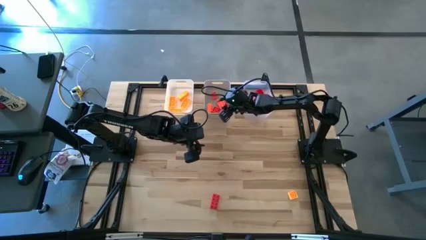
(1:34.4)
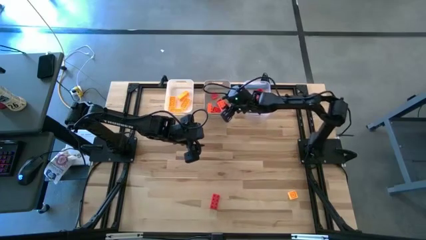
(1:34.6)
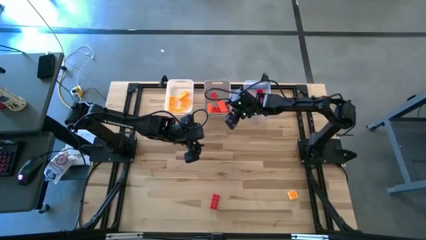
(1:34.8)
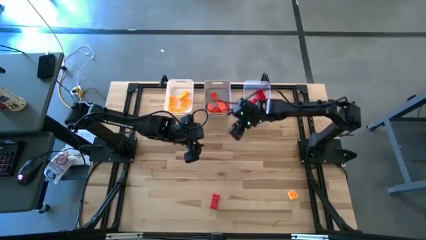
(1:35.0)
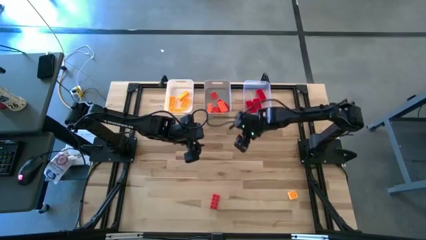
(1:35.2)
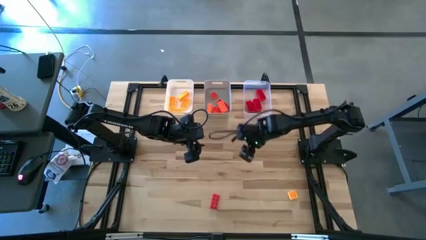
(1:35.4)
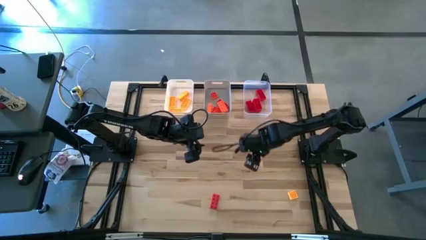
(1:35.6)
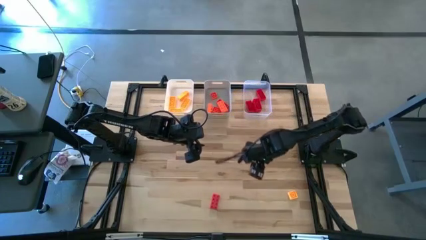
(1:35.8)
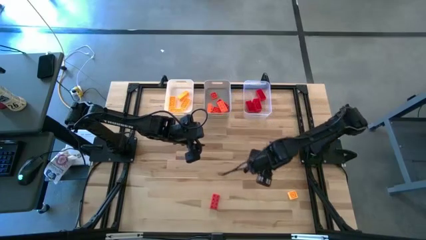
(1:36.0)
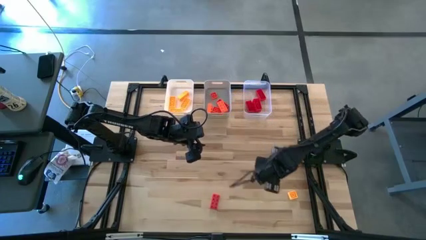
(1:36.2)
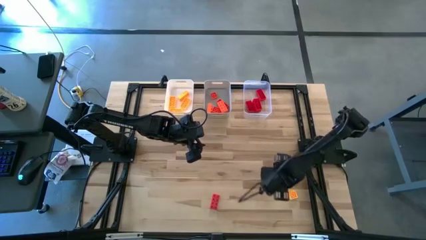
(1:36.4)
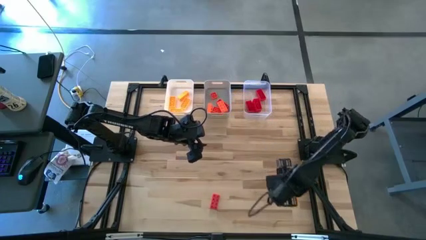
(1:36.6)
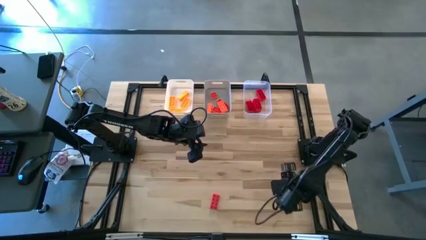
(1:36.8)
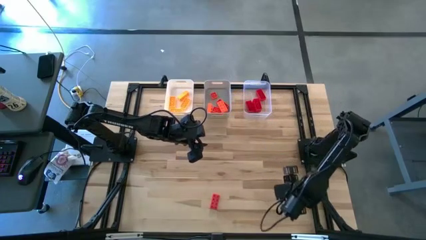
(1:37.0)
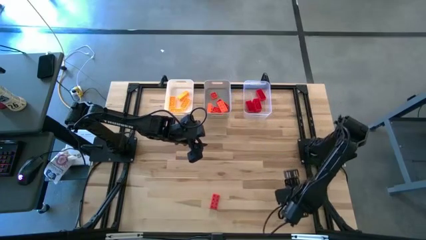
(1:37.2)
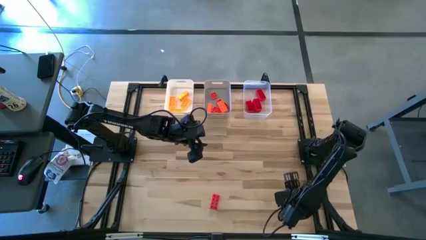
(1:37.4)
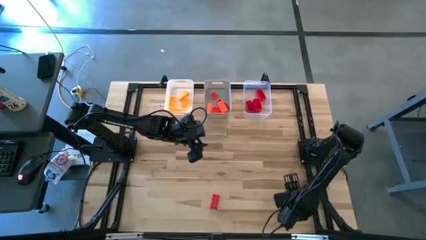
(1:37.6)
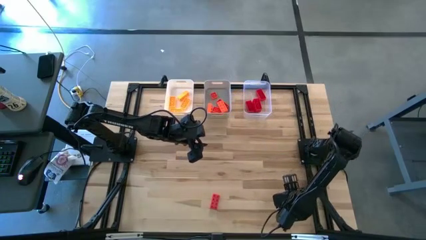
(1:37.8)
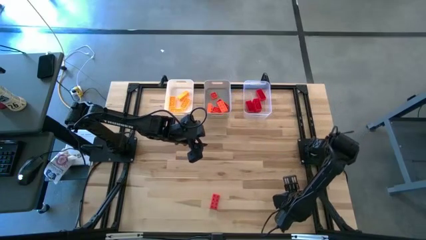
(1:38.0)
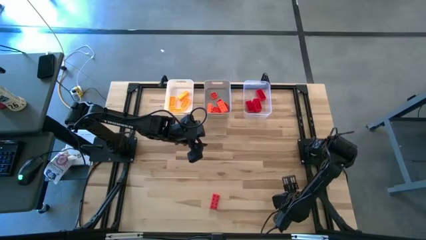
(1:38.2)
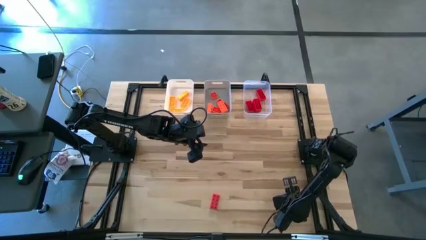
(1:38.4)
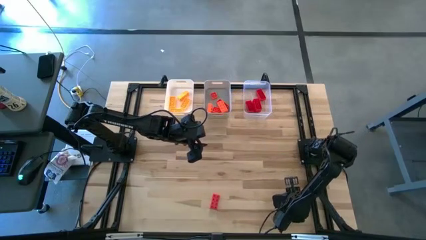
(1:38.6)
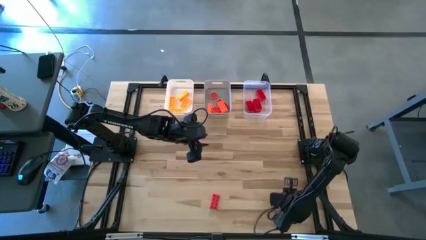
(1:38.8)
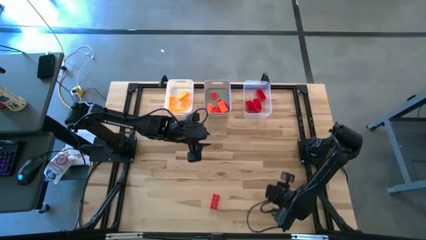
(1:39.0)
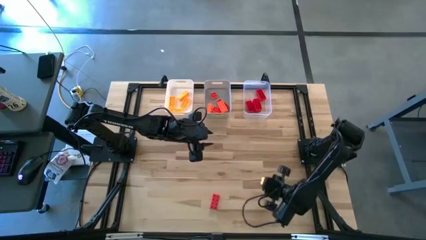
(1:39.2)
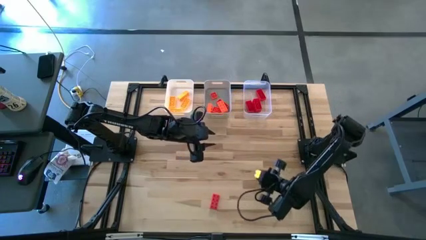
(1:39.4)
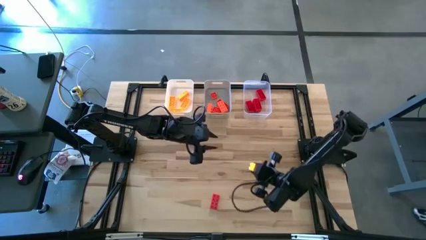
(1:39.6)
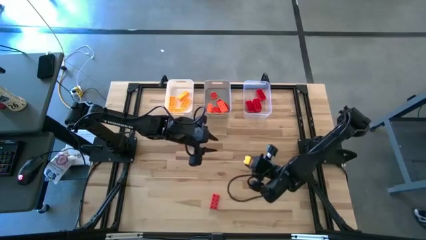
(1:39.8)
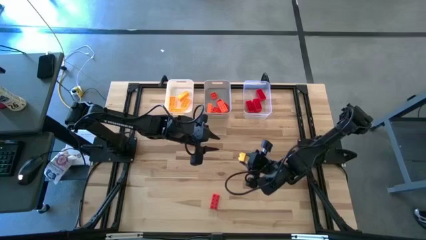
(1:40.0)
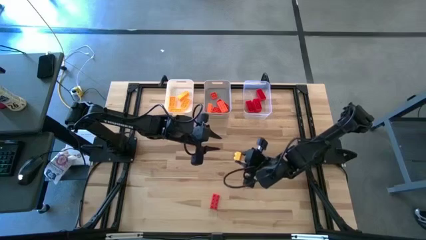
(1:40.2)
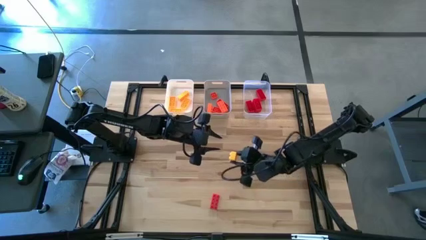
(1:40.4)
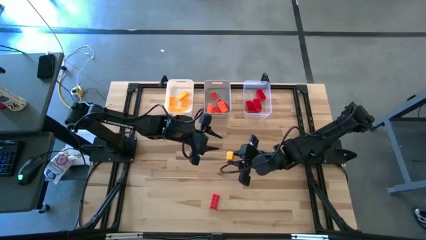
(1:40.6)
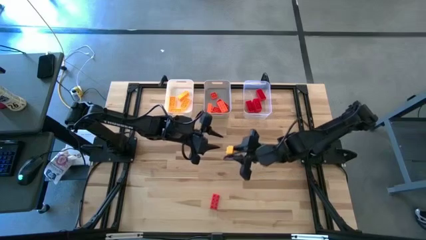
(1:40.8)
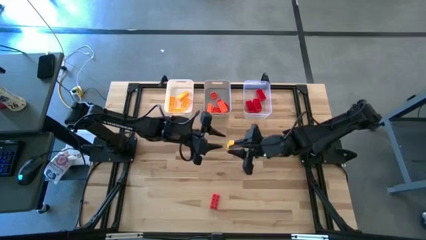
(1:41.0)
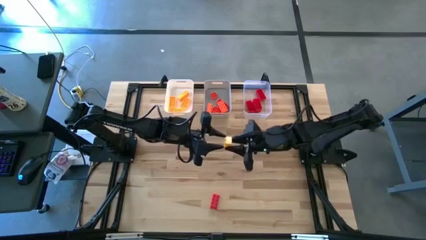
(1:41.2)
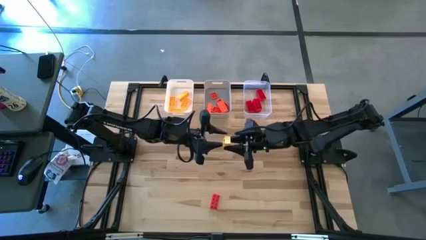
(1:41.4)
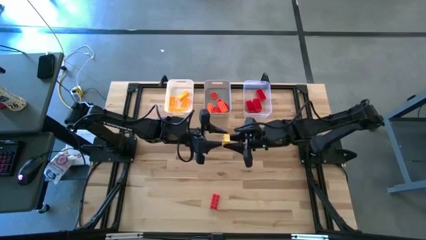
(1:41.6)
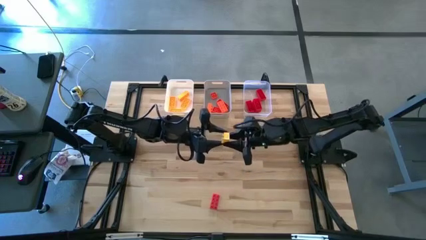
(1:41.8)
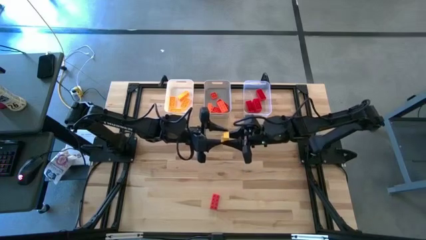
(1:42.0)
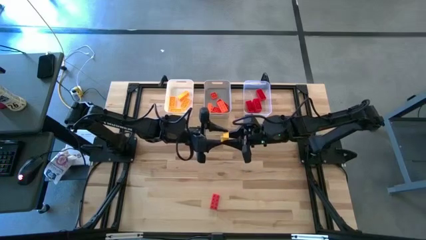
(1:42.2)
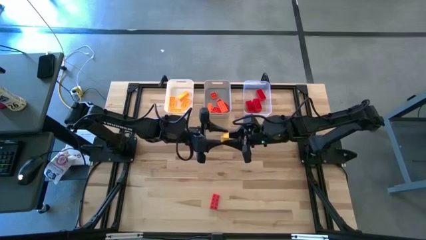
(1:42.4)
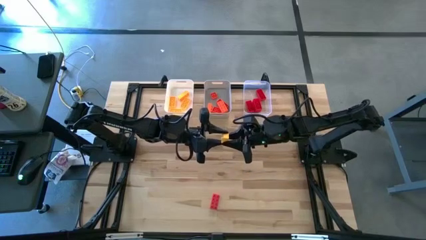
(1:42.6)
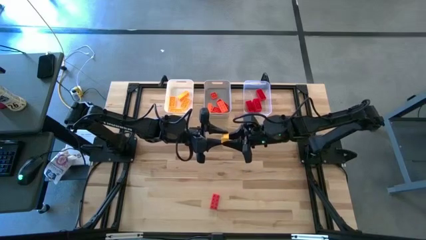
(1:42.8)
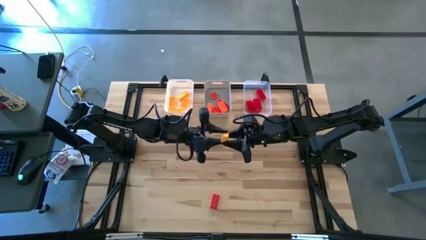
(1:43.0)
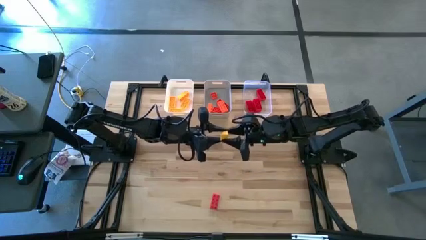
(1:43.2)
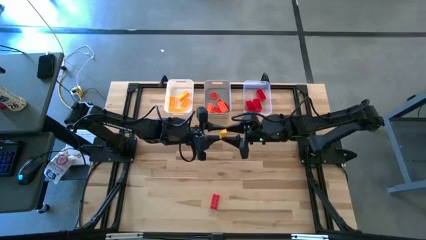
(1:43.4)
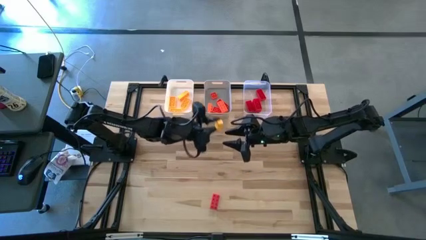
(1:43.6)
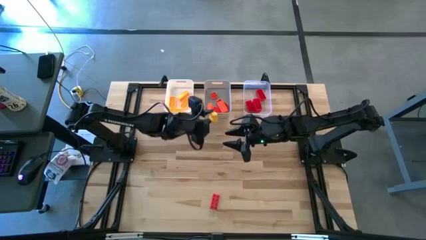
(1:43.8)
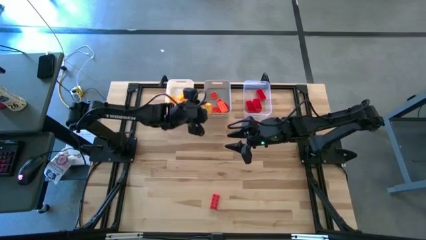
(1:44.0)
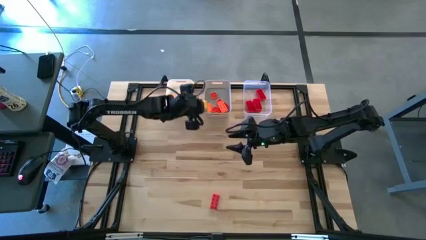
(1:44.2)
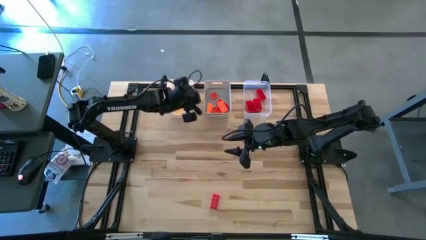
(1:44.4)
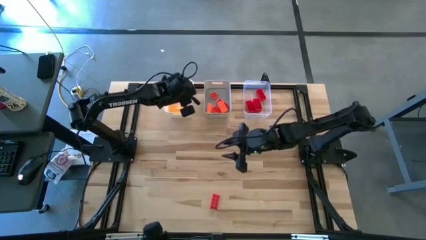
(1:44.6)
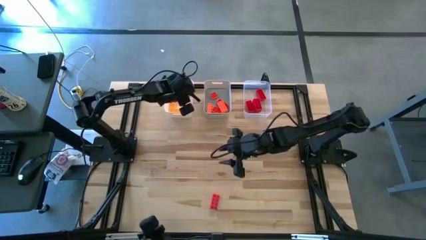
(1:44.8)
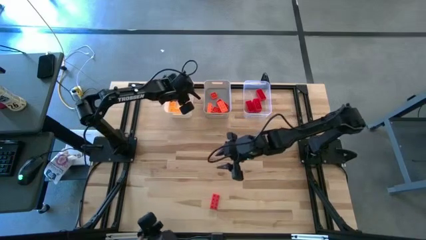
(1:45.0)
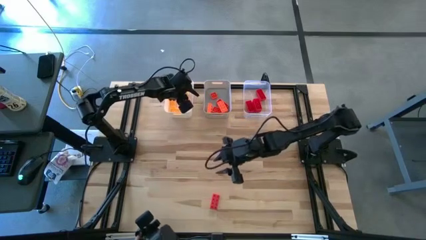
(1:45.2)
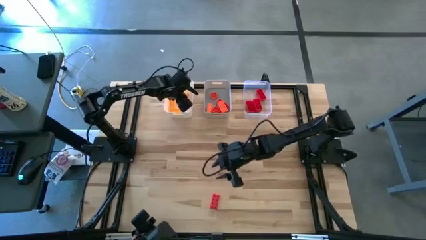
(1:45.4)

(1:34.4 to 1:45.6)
Task: Sort & place blocks by color
Put the yellow game piece into the white bin

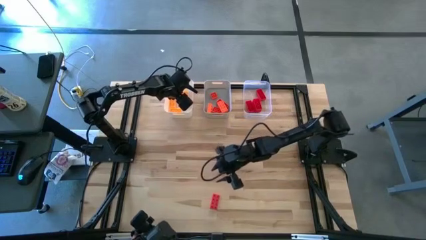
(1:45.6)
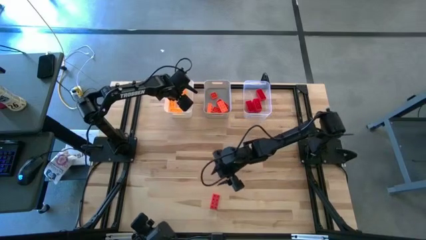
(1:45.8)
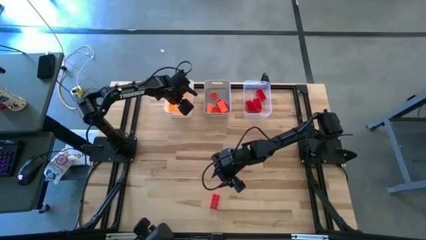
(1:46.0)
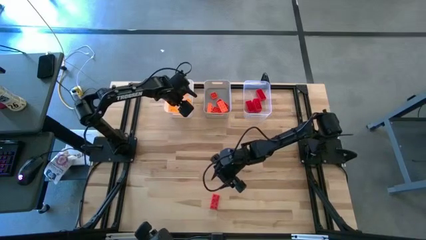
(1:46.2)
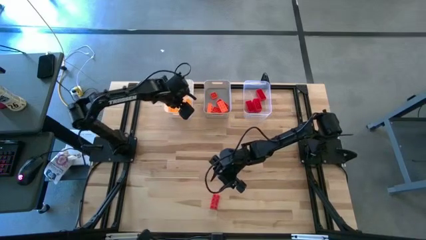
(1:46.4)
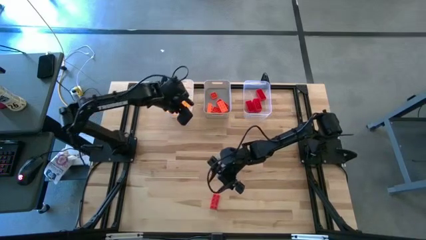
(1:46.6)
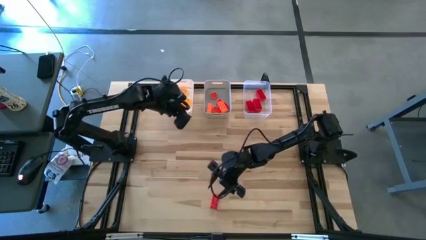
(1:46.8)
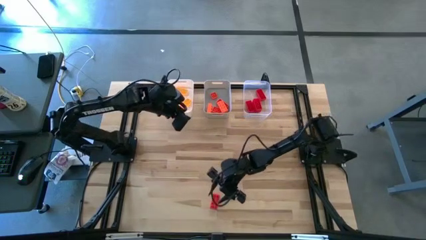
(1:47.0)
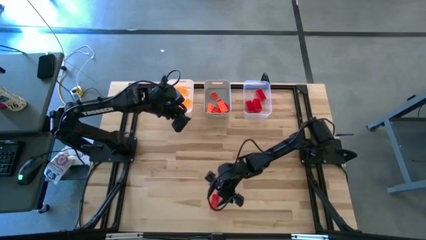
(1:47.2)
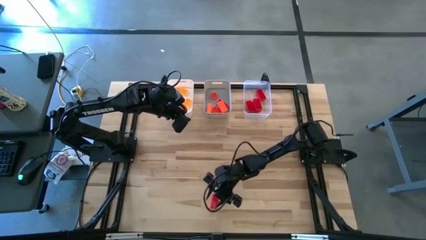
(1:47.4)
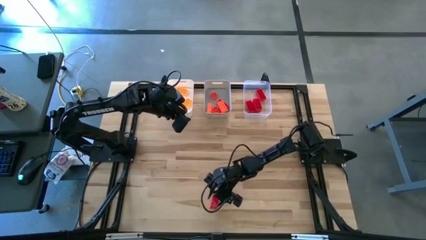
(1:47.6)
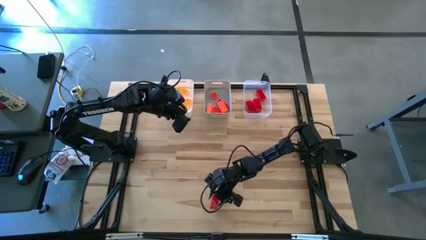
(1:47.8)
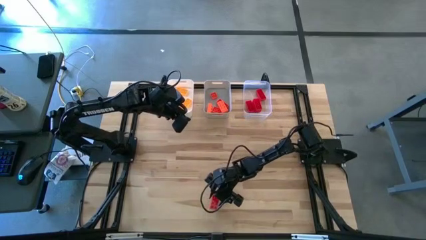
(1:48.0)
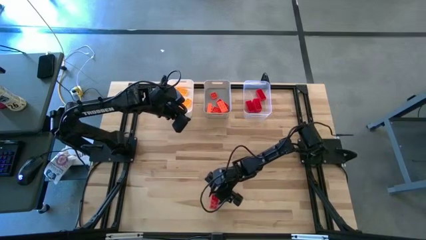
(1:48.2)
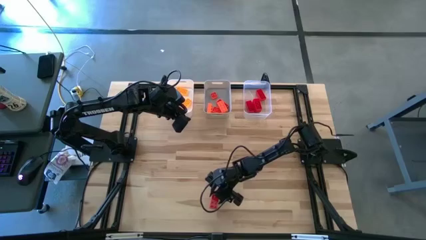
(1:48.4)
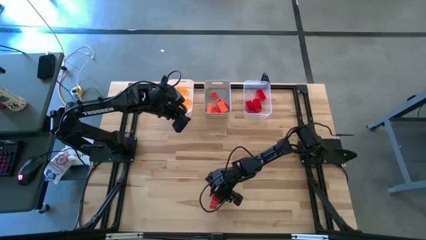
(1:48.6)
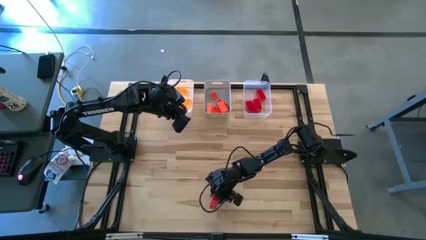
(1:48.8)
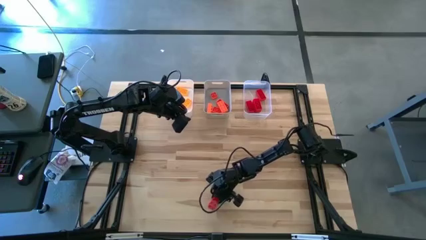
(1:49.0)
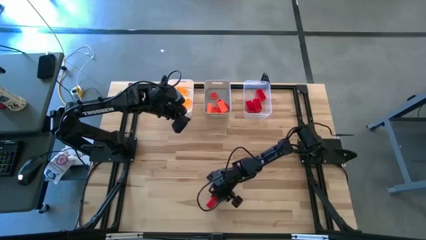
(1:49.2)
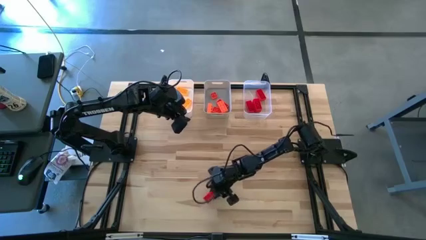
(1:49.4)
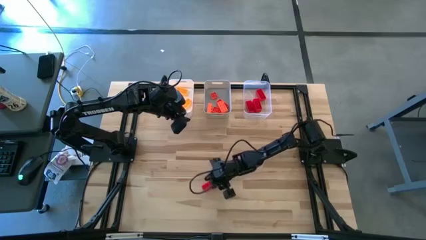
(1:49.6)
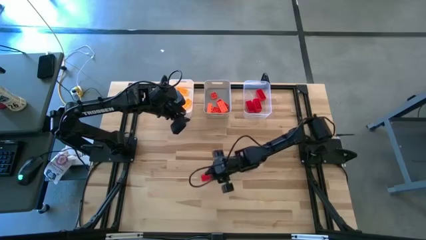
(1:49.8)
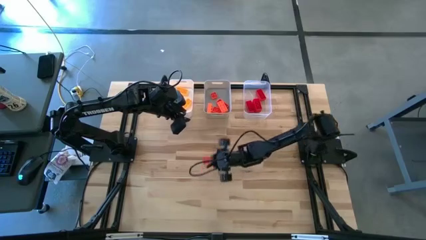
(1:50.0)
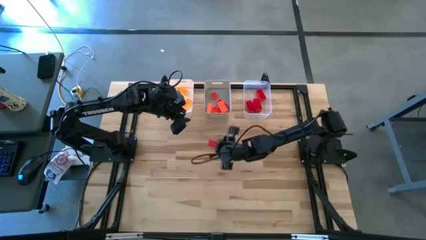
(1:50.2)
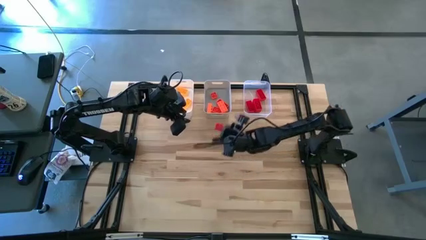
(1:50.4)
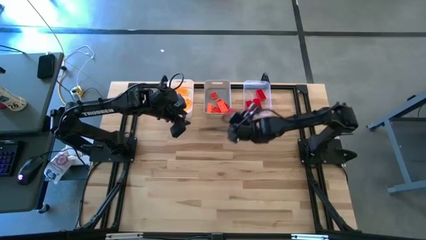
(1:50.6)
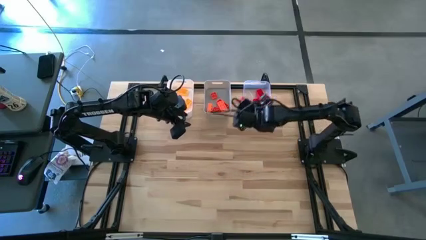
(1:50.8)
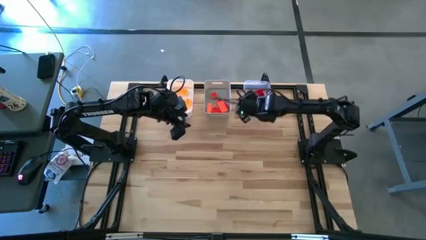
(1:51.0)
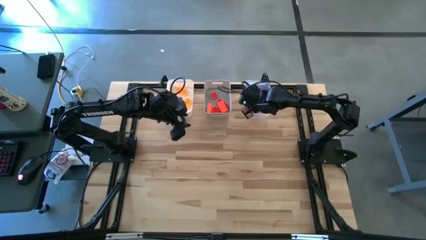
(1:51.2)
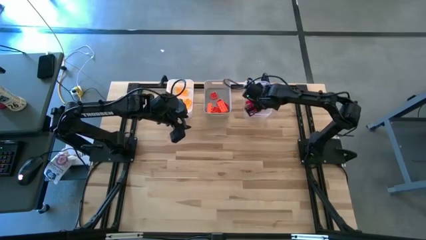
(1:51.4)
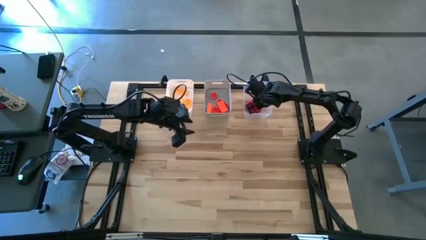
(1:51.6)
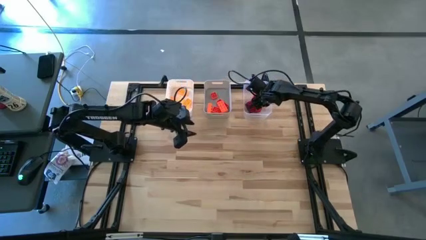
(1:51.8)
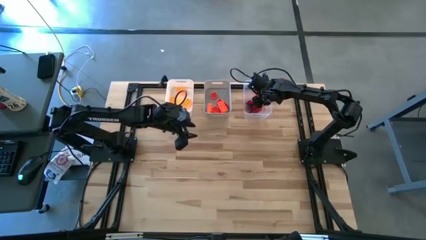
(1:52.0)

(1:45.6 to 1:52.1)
Put the red game piece into the transparent bin
